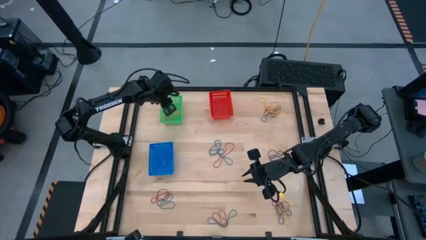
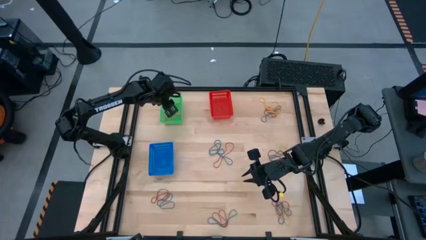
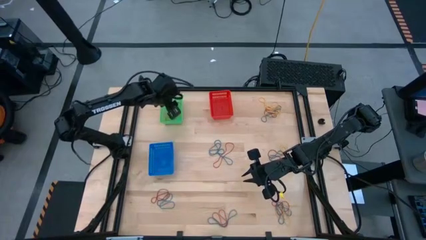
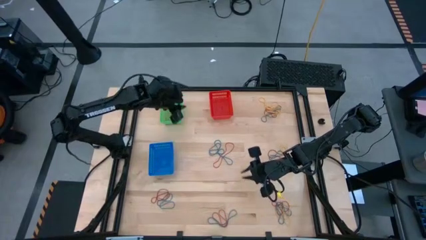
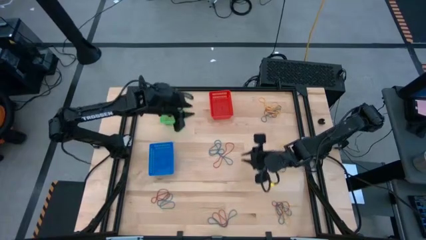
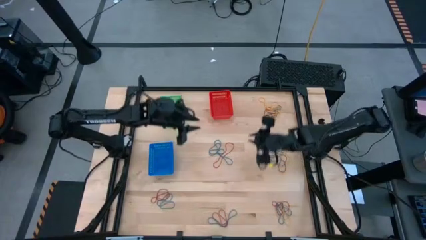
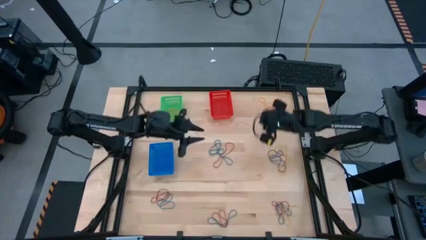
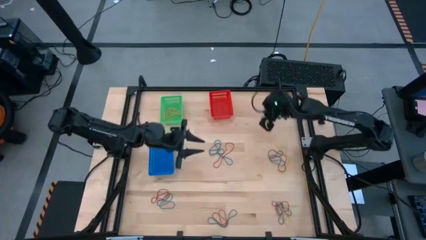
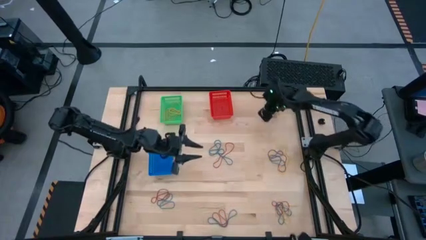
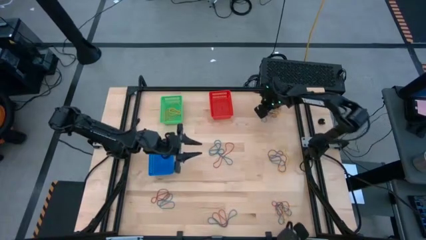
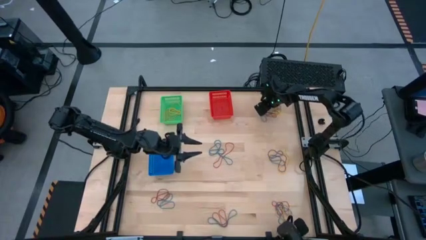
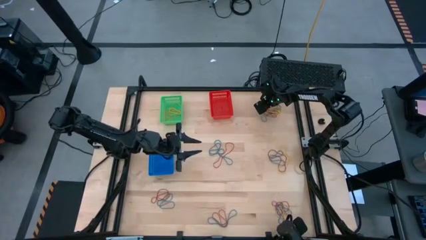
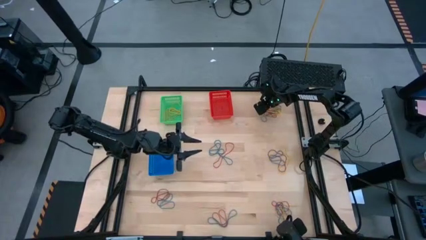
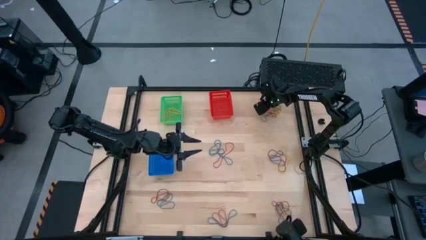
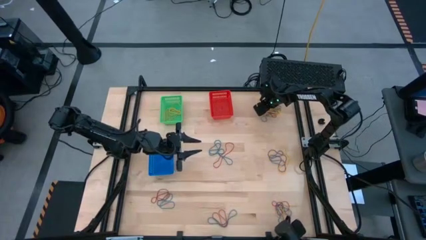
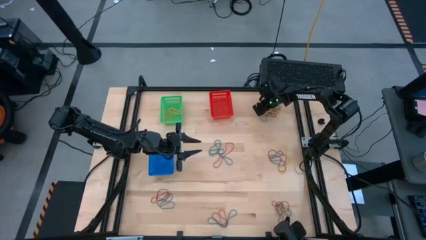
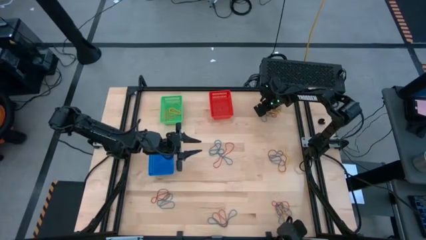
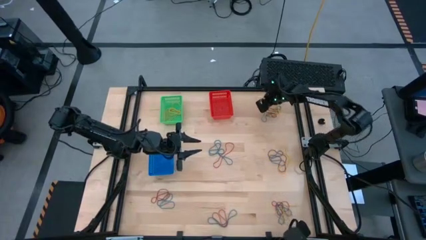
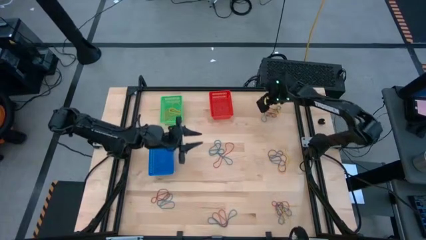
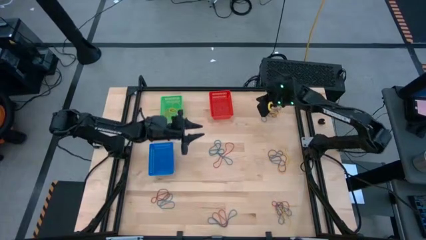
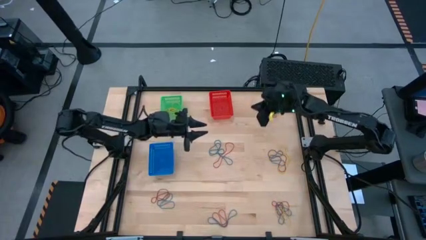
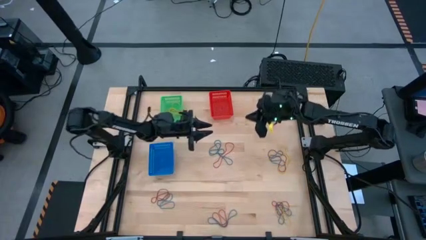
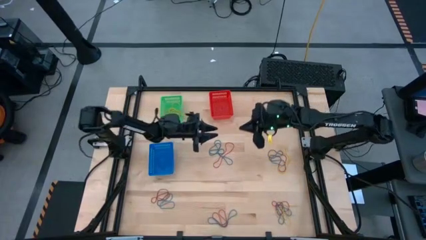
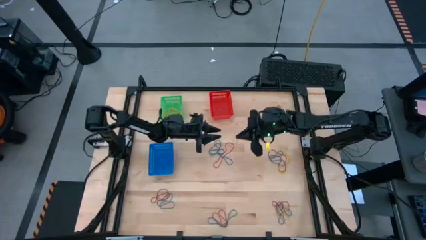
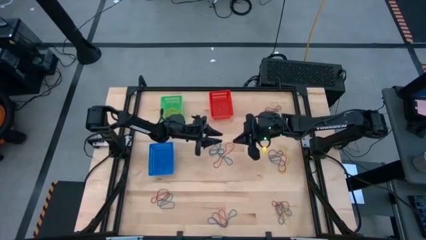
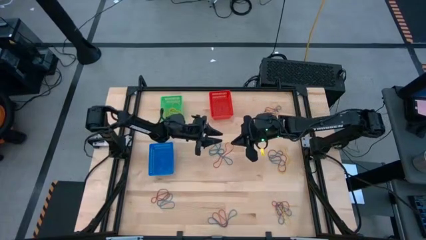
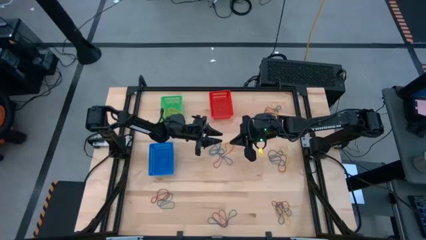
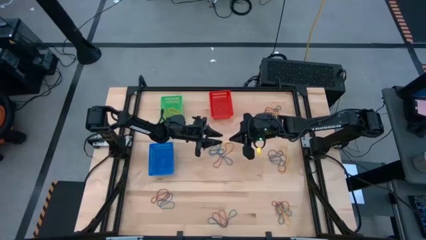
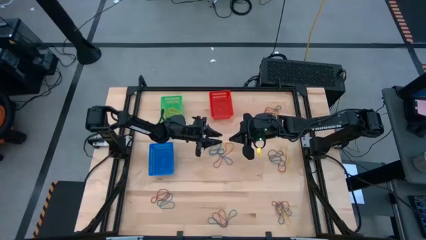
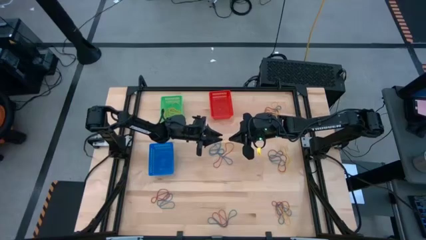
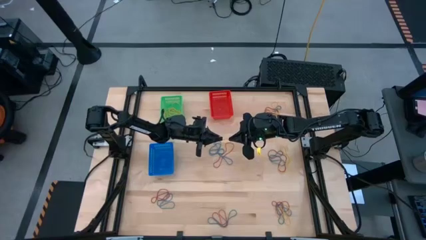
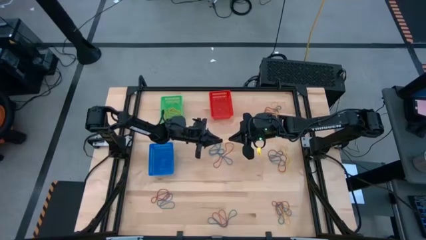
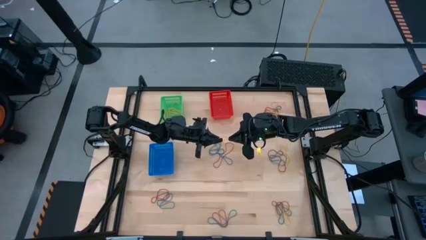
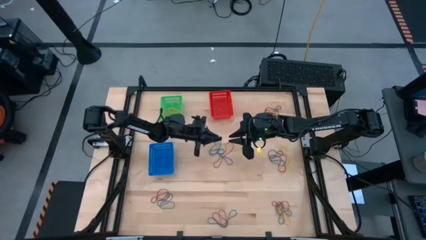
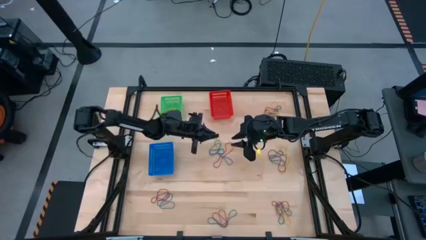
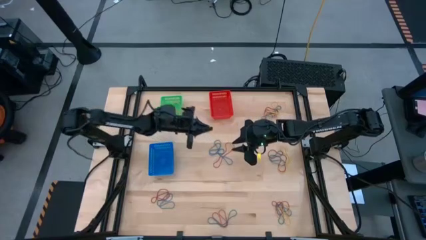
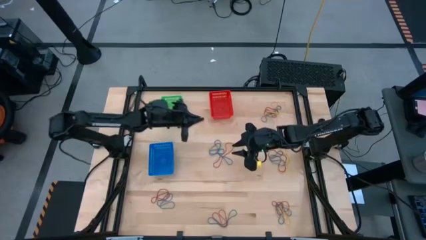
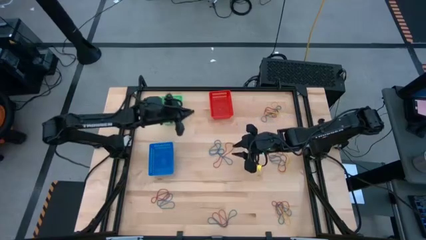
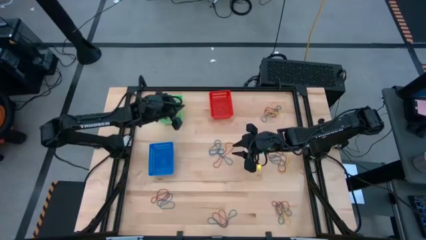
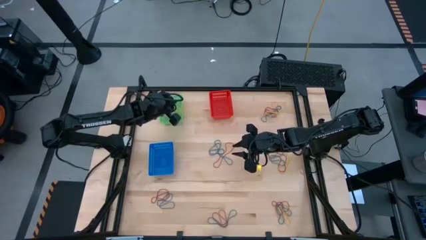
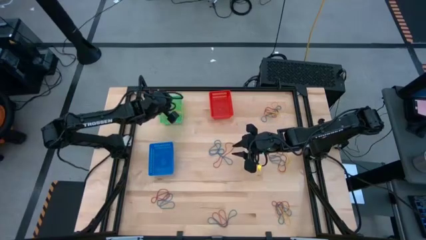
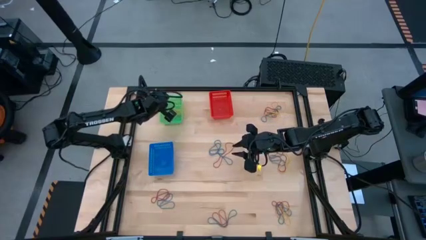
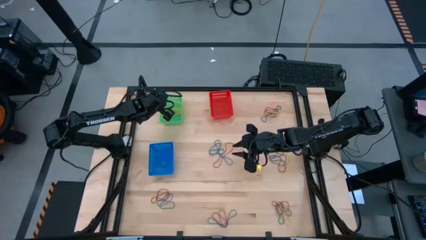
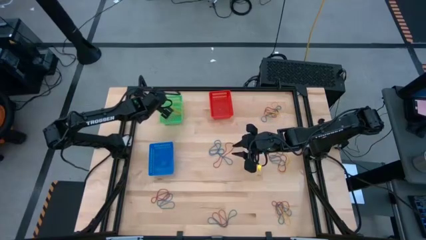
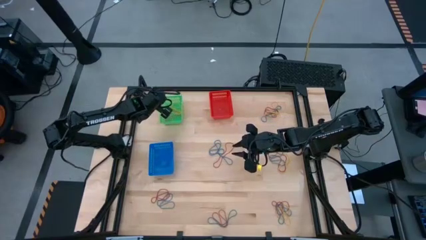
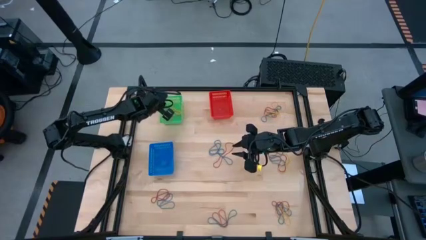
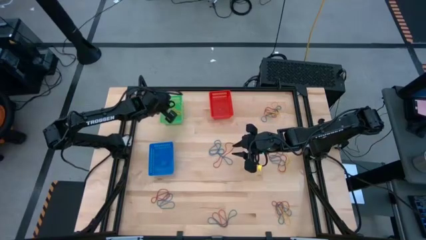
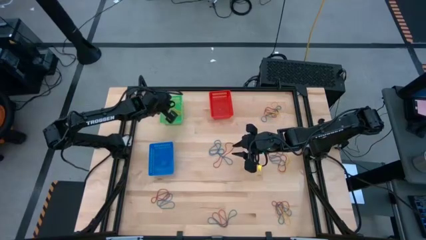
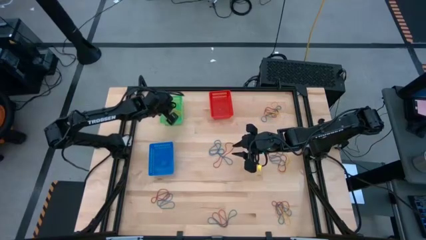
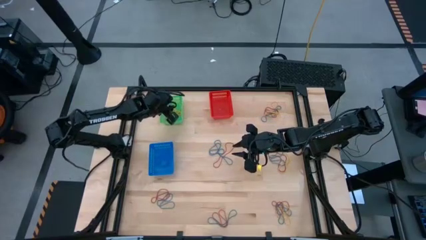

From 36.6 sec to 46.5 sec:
Task: Sort rubber bands into baskets
Put the yellow rubber band into the green bin

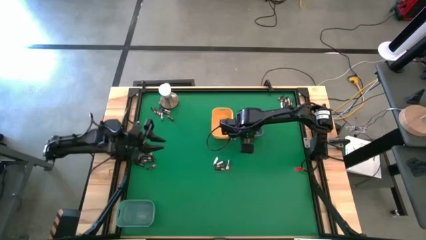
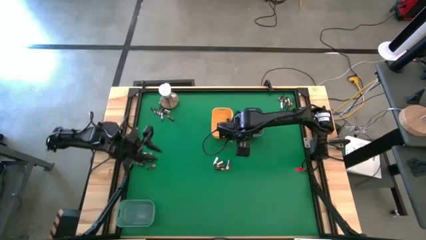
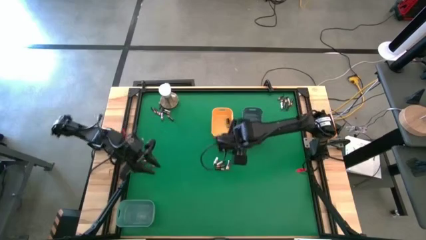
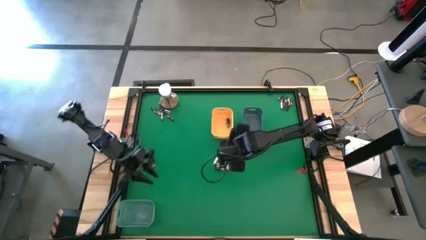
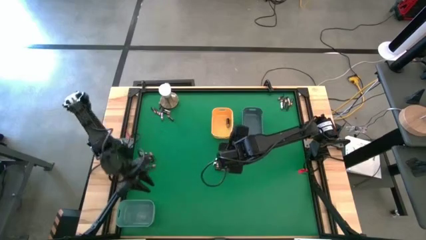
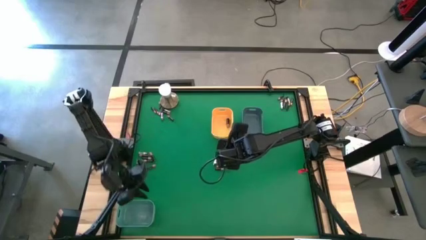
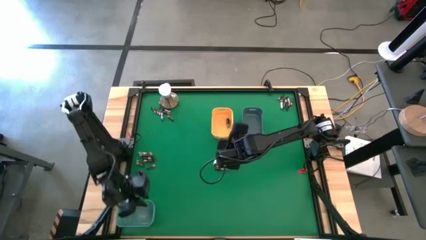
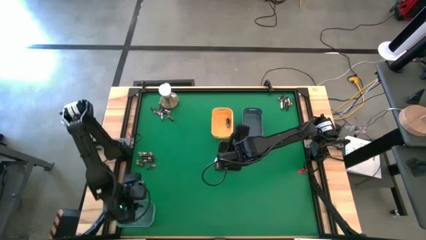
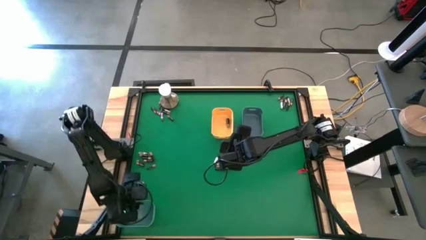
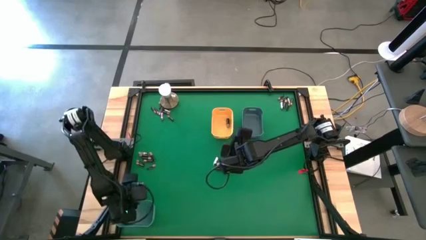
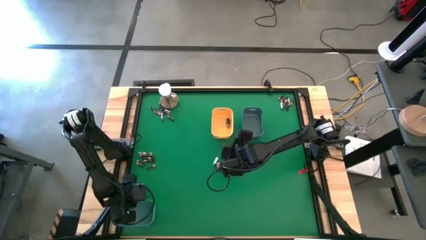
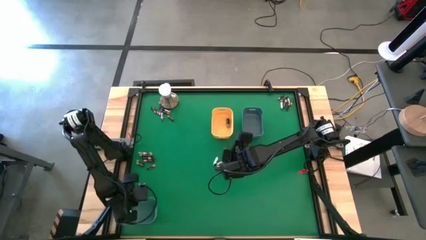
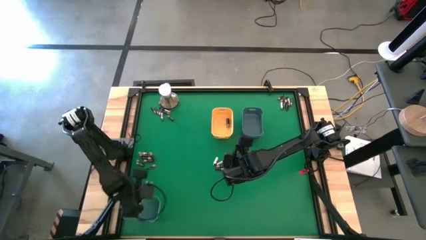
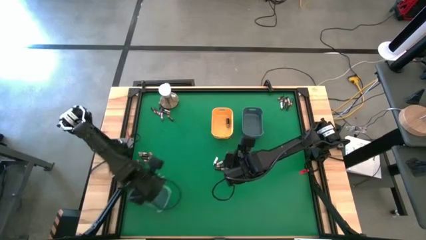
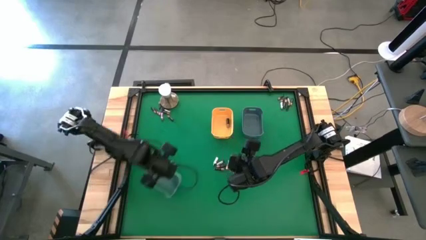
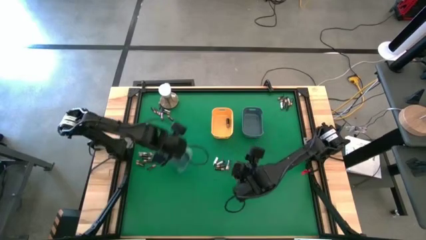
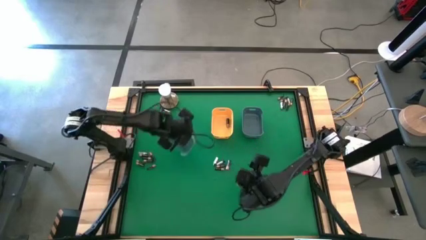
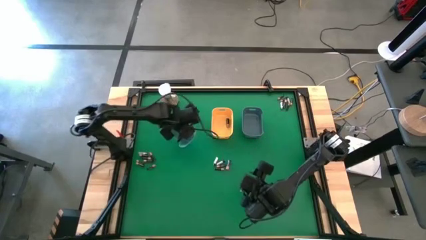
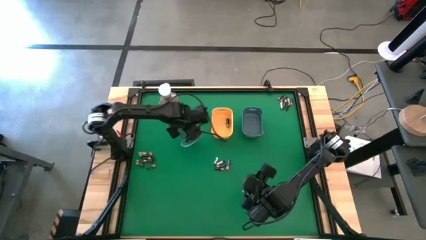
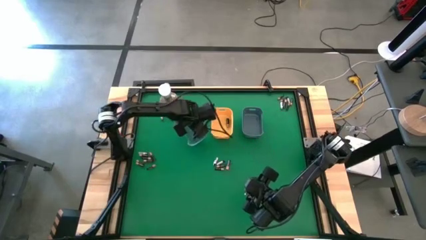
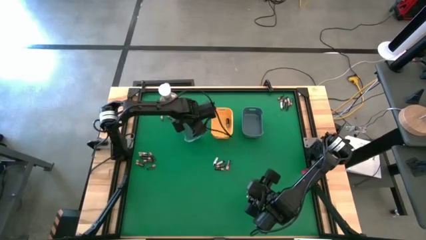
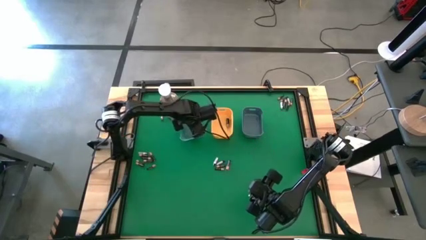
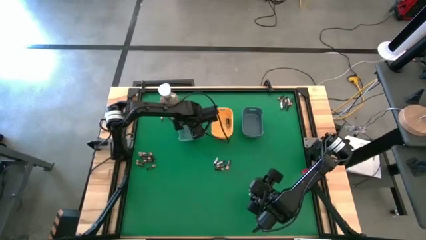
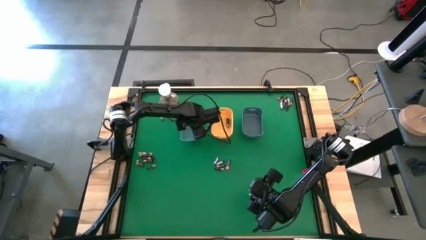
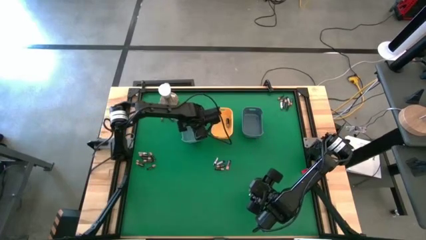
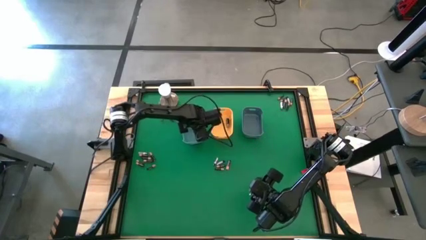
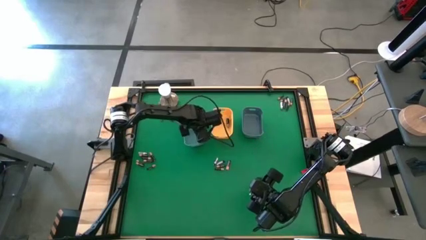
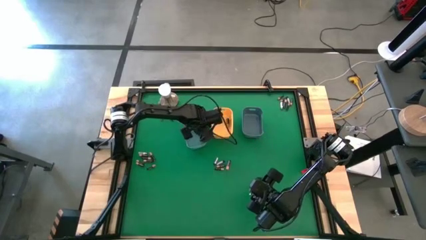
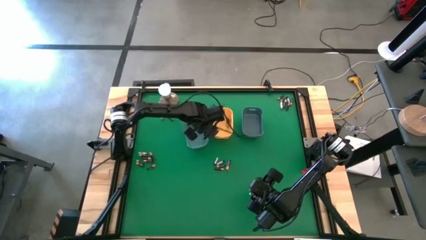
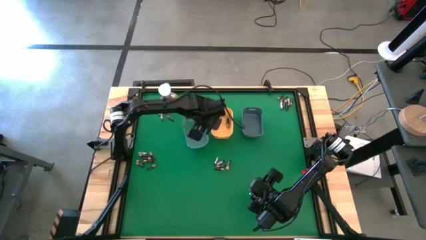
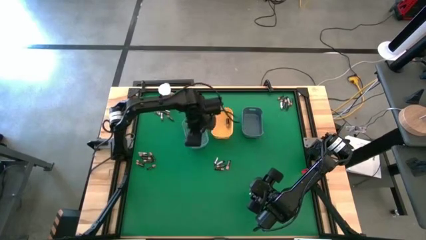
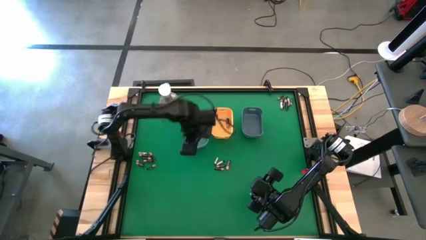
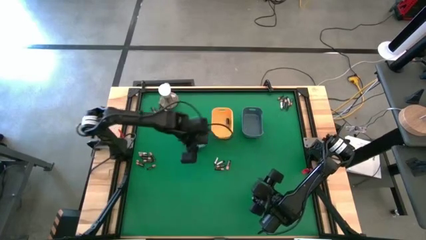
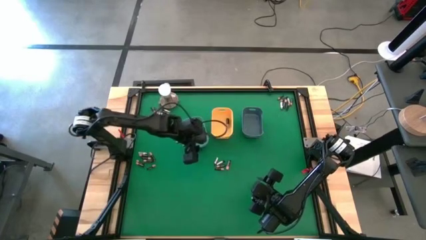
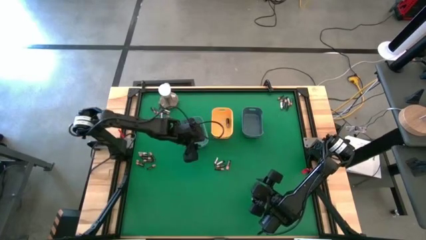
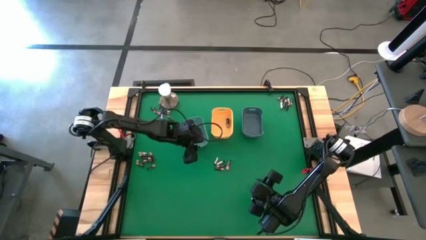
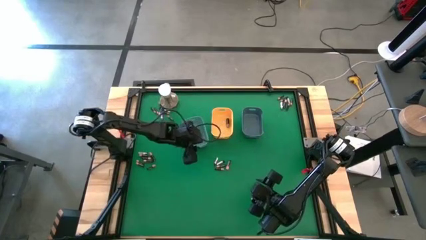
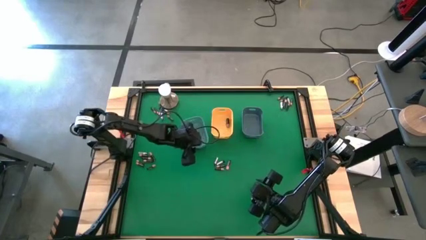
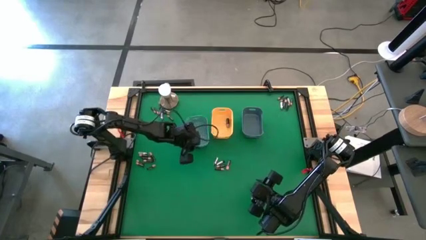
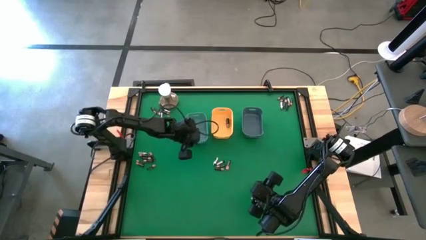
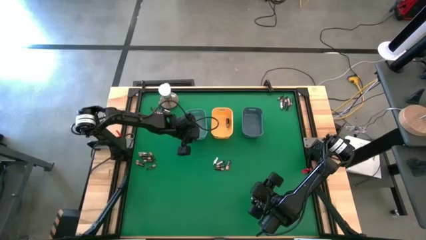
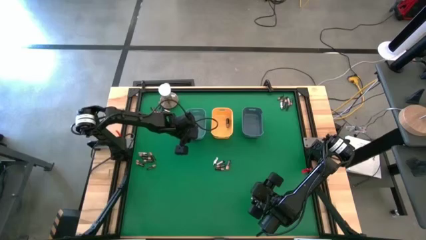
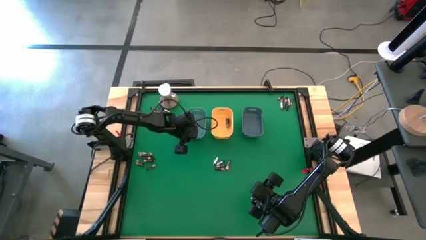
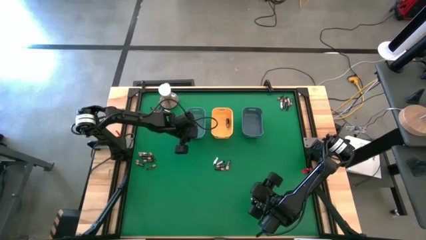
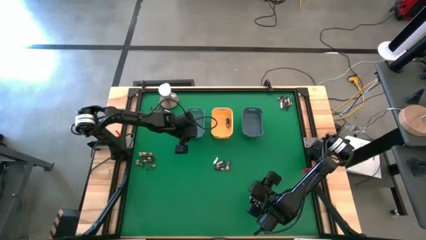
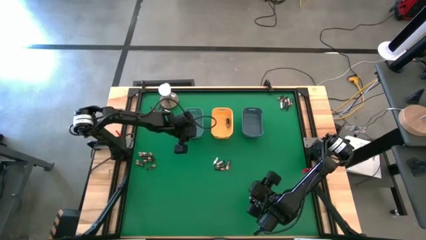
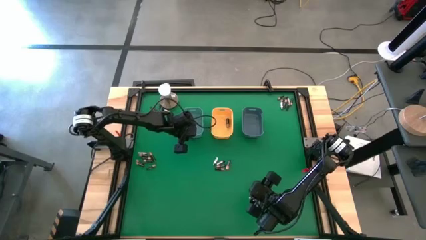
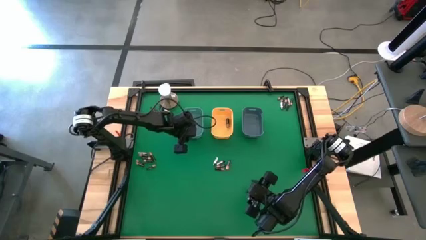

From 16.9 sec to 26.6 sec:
Task: Sort batteries
Move the green bin to the top of the table
